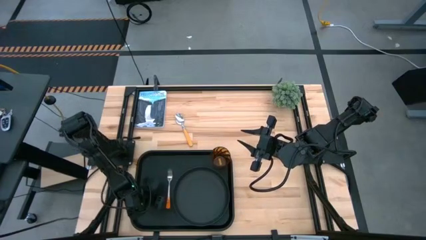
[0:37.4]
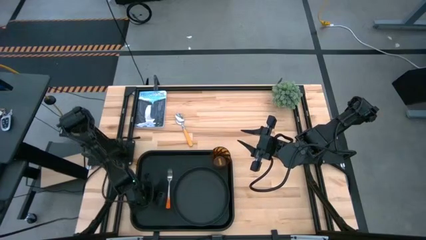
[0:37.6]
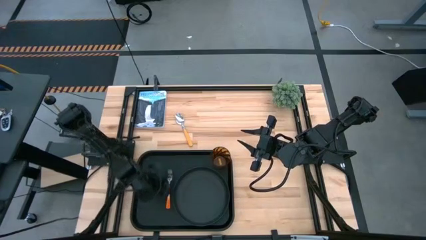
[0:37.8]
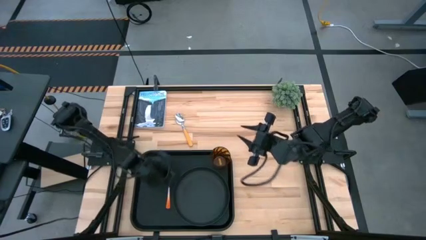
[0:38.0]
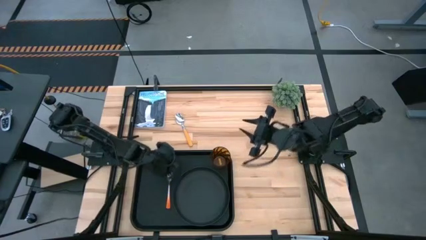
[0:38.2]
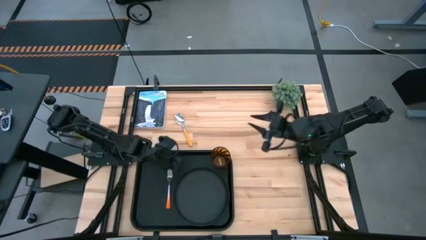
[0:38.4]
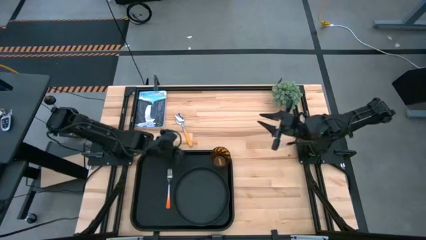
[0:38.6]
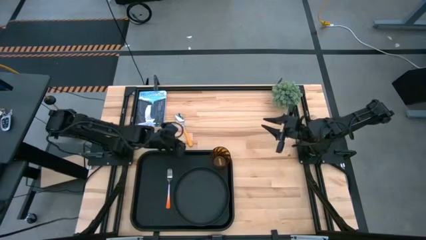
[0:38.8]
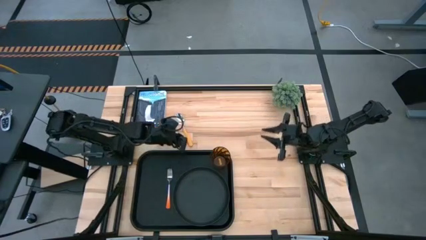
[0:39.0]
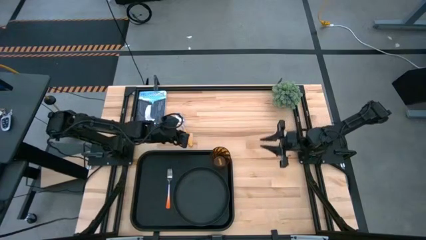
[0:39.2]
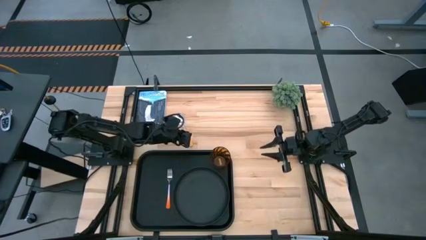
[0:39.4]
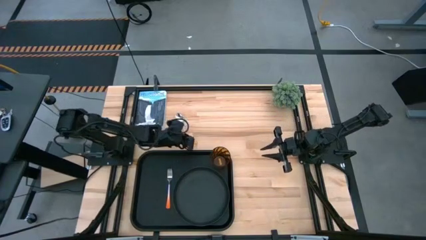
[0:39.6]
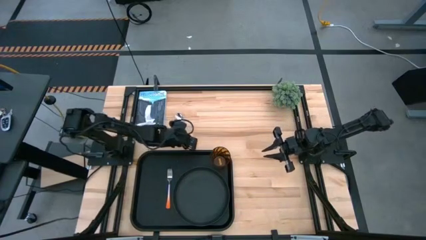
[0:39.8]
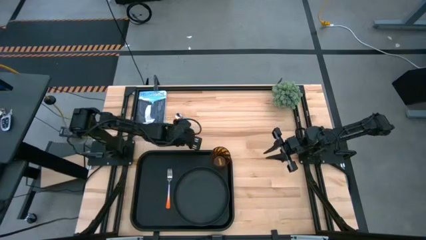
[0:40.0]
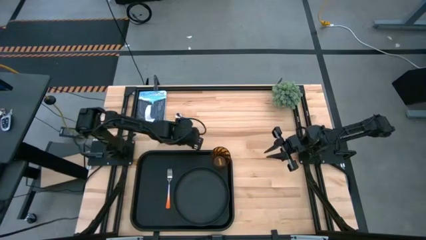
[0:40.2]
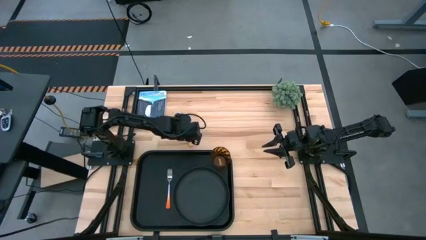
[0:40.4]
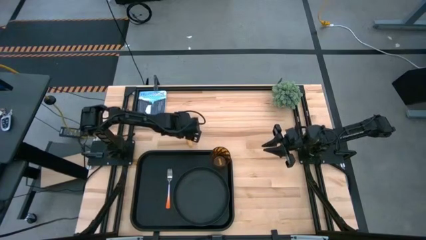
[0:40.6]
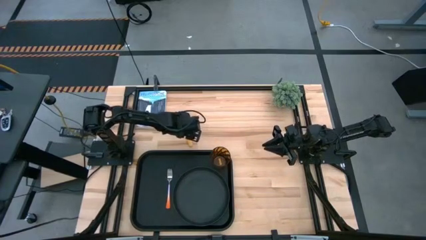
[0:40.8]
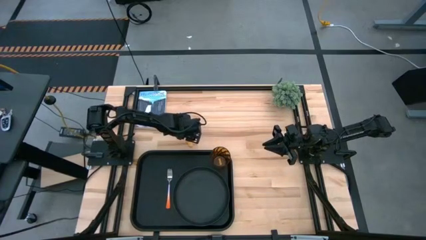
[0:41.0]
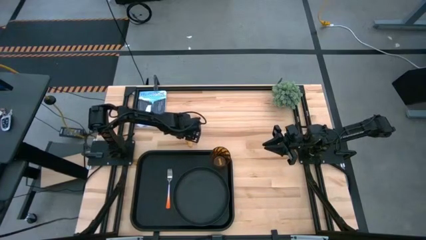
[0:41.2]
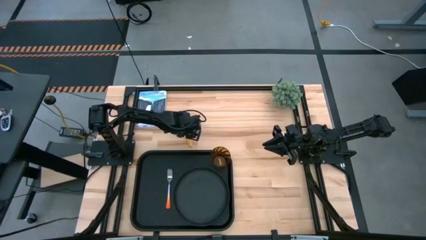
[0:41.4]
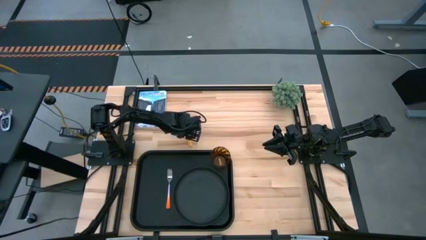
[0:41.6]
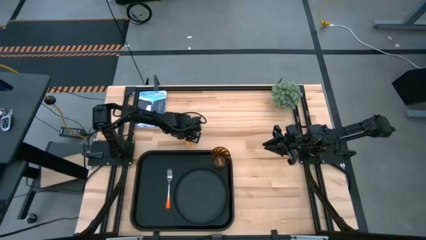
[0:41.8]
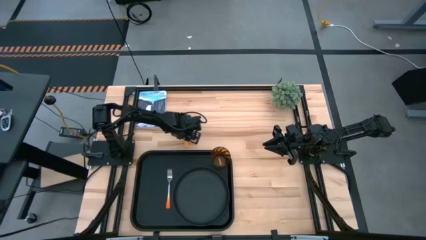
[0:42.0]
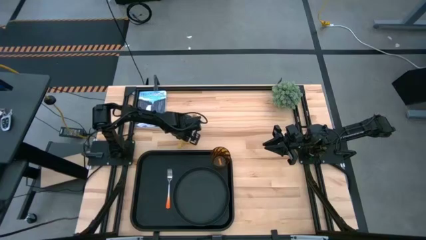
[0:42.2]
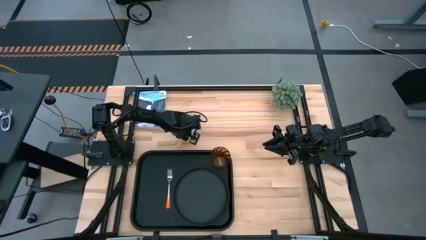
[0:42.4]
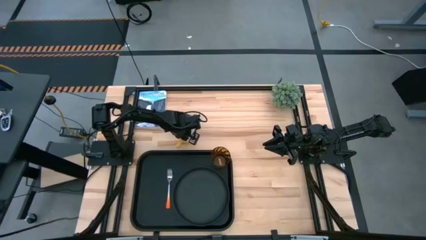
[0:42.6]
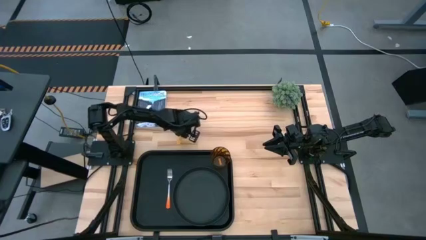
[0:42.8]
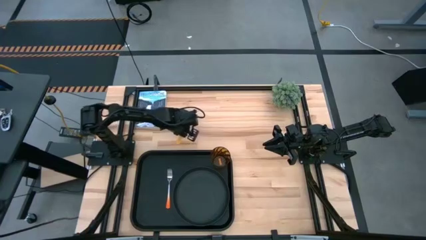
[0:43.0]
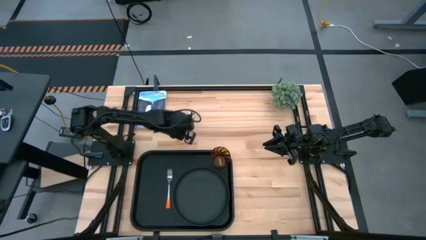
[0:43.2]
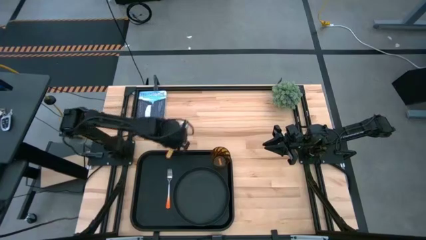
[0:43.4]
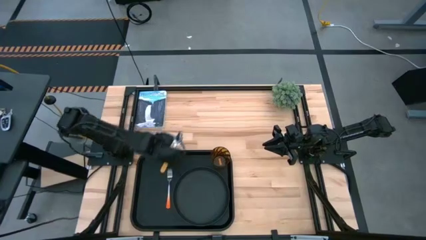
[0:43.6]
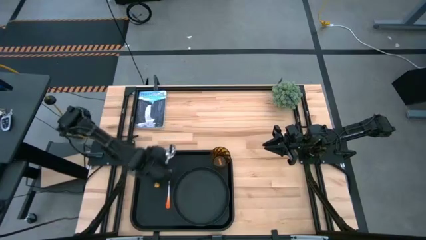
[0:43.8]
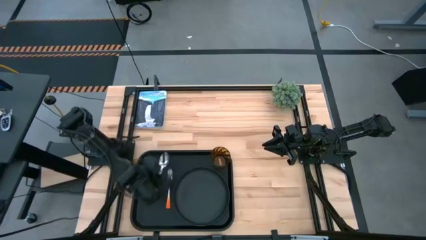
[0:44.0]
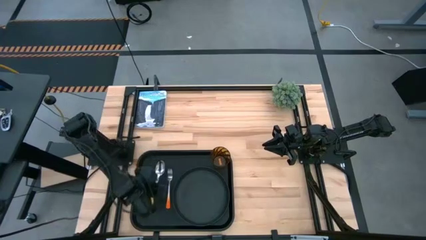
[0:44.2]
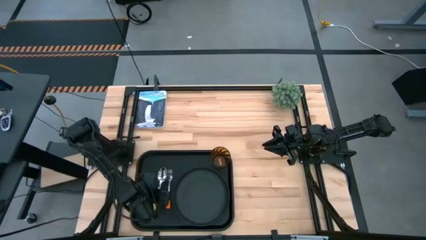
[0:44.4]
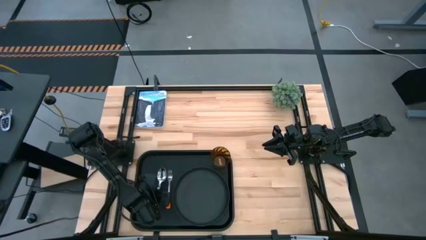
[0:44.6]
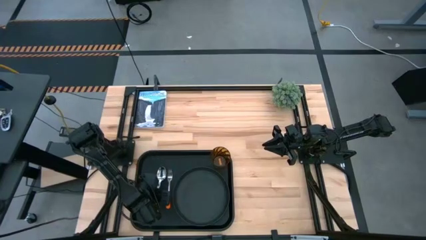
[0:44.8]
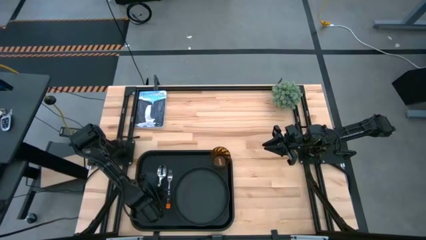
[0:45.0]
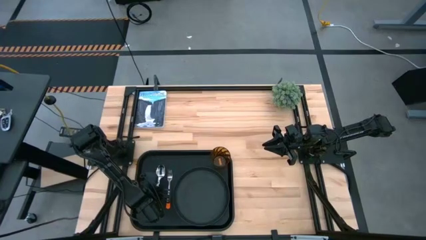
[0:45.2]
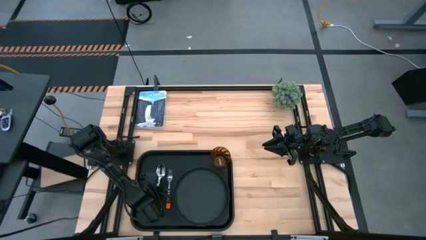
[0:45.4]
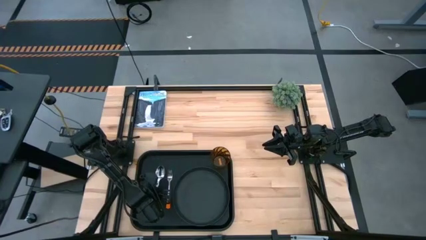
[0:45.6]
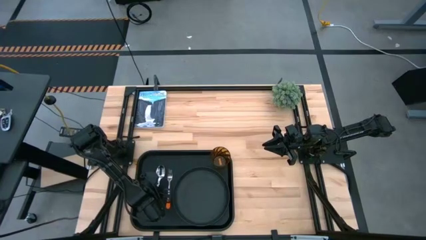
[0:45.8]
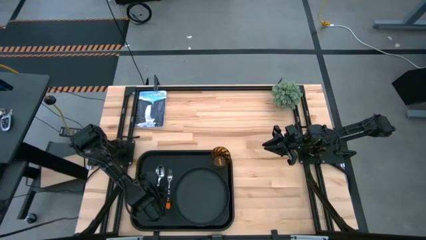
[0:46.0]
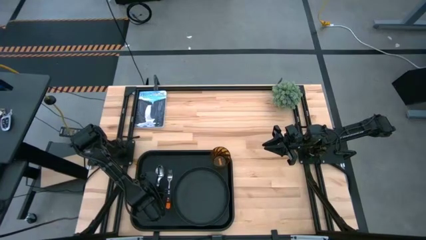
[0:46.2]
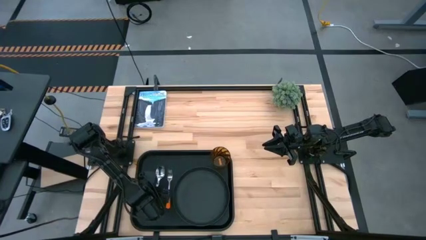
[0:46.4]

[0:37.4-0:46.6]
Task: Pick and place plate/cup/fork/spoon on tray
Put the yellow spoon to the left of the orange fork on the black tray

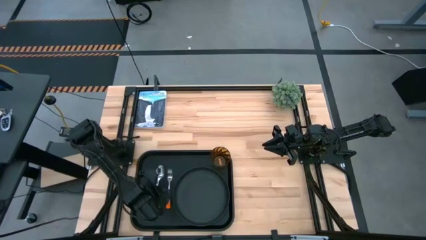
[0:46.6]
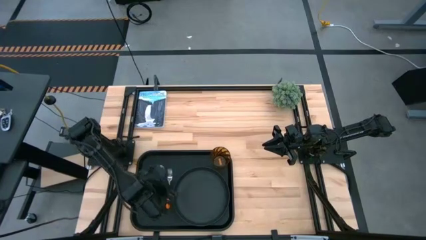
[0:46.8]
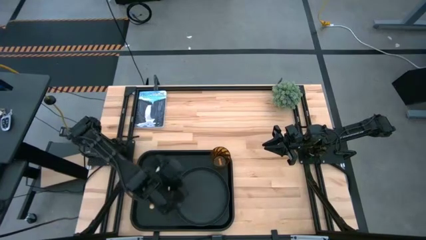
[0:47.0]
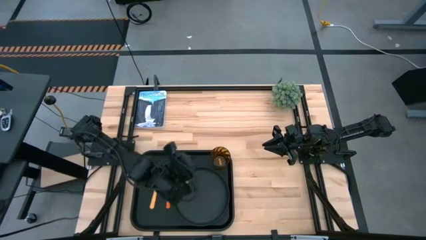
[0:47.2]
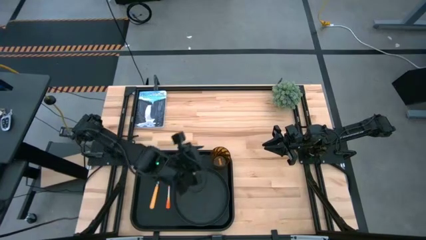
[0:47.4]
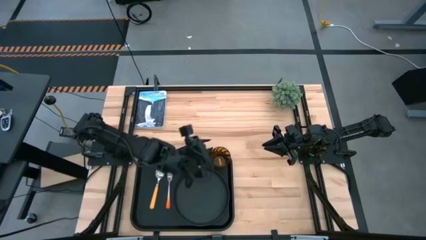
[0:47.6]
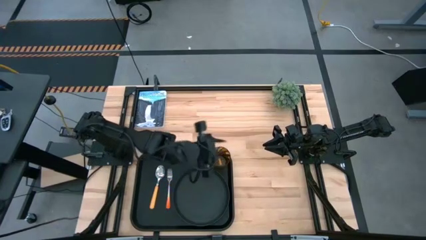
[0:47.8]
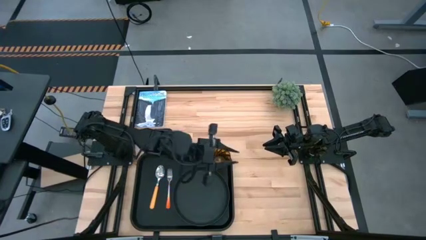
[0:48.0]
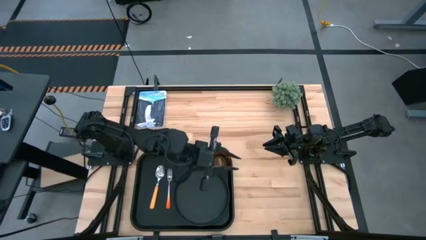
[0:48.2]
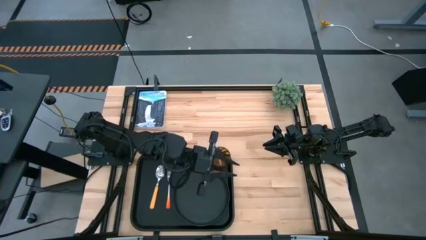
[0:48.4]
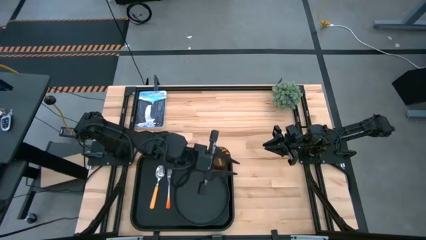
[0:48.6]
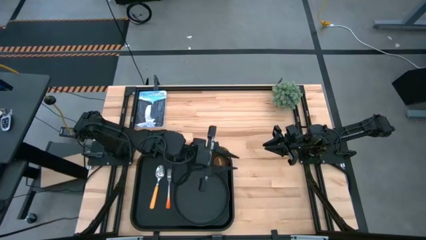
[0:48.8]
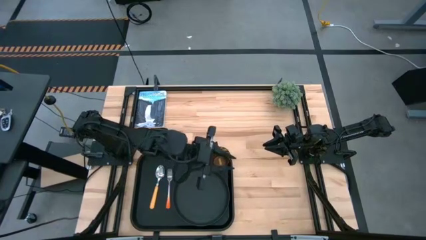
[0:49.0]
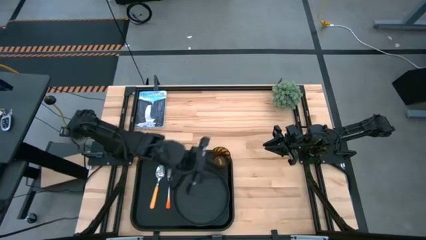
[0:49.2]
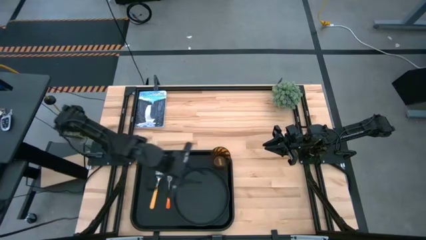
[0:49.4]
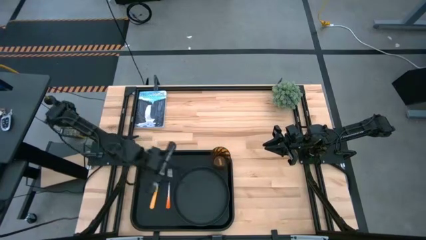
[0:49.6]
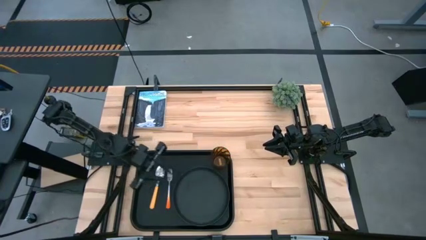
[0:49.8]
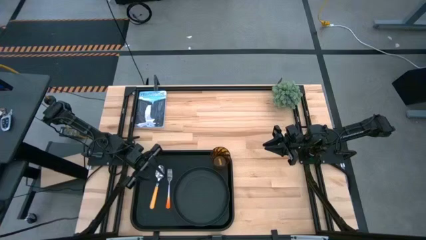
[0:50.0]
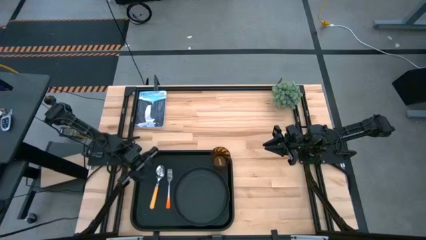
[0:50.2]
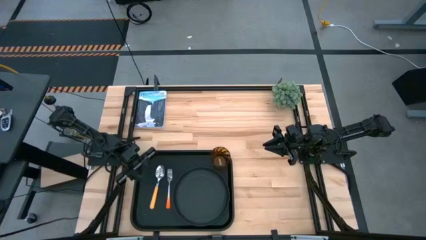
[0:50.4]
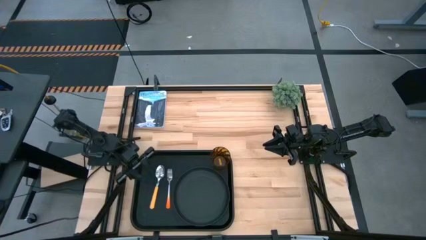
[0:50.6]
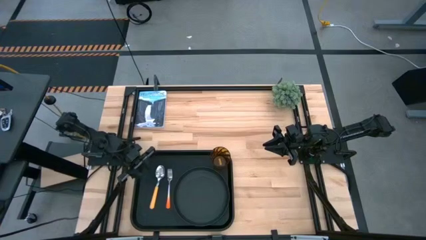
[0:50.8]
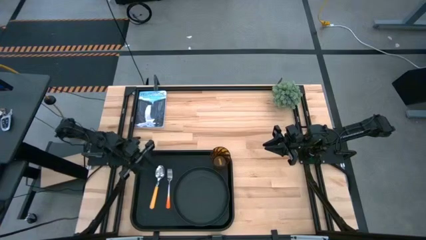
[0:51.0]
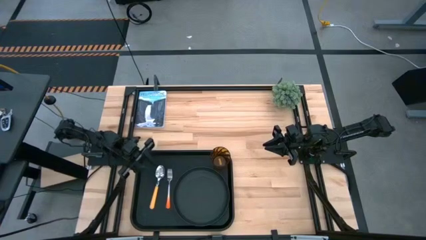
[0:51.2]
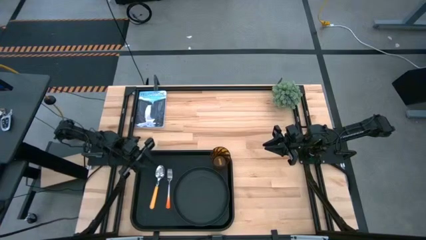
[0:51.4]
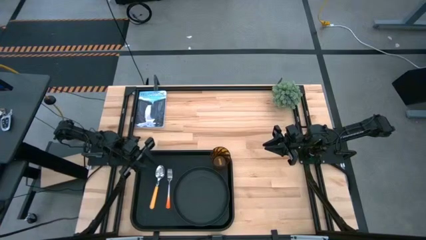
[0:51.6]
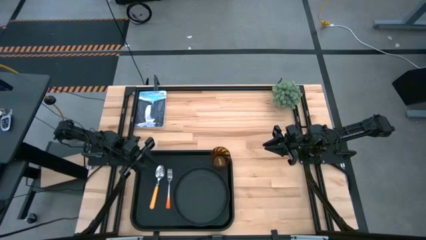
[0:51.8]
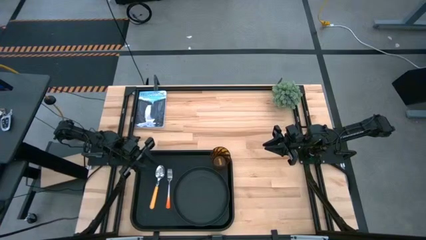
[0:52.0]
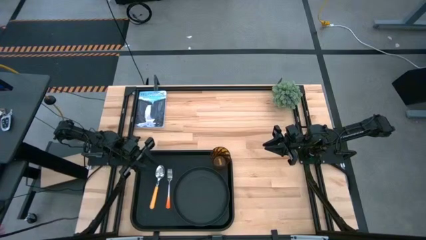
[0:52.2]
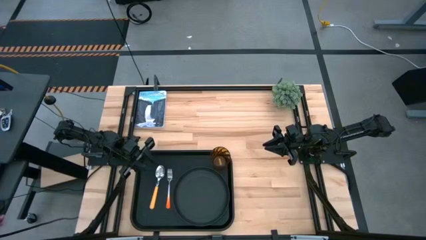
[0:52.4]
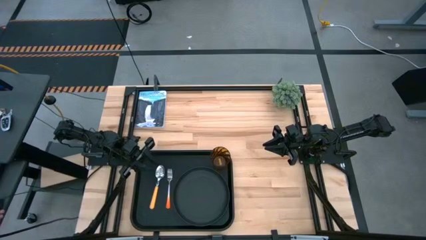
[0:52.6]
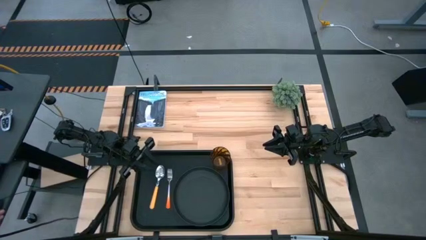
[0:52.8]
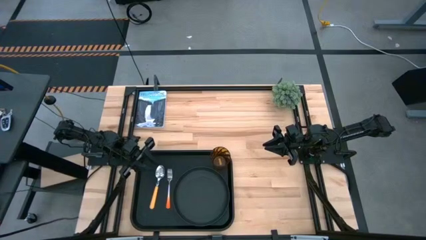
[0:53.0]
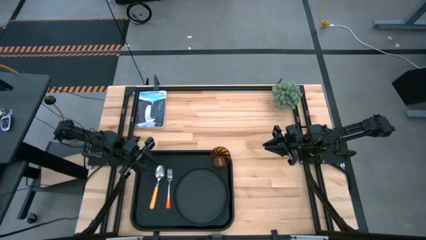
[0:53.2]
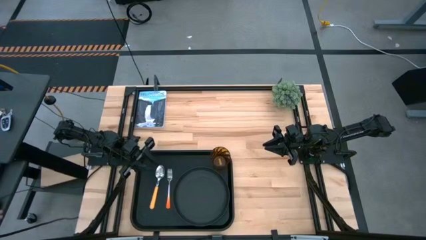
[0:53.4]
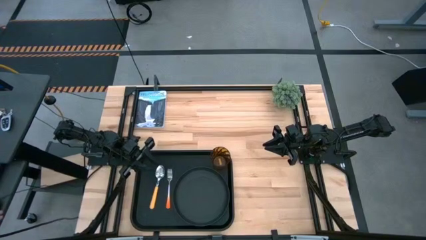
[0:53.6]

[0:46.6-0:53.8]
Return to Home Position
